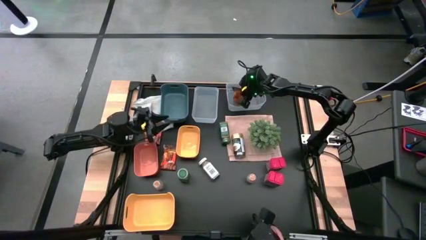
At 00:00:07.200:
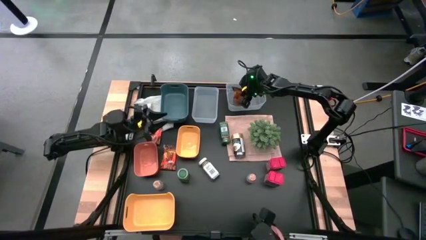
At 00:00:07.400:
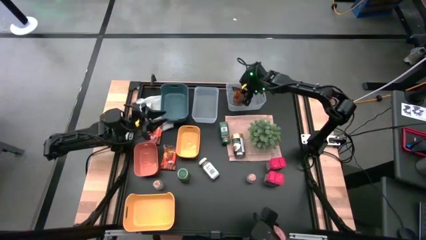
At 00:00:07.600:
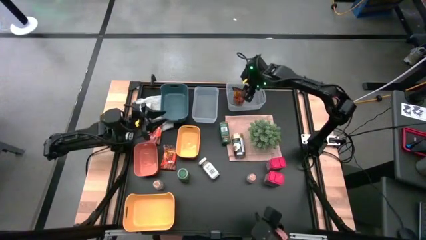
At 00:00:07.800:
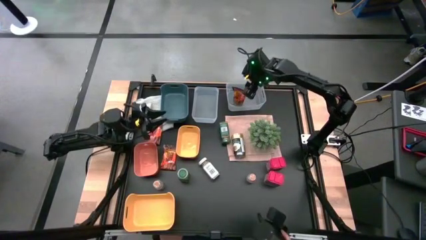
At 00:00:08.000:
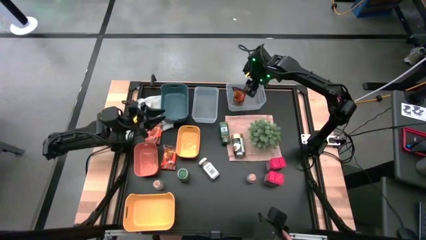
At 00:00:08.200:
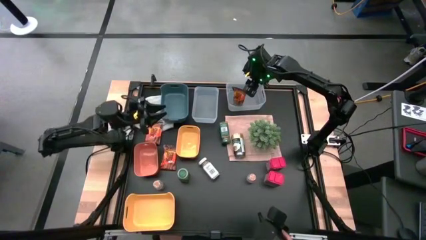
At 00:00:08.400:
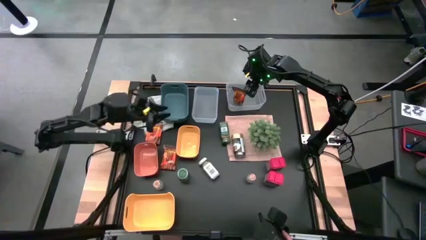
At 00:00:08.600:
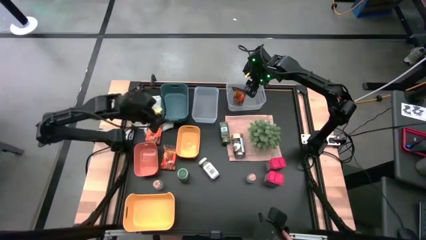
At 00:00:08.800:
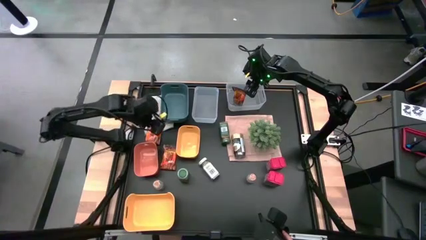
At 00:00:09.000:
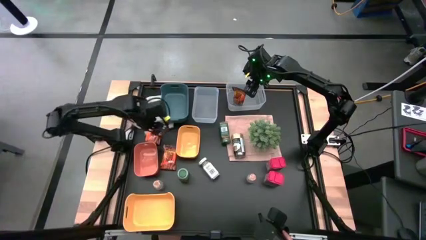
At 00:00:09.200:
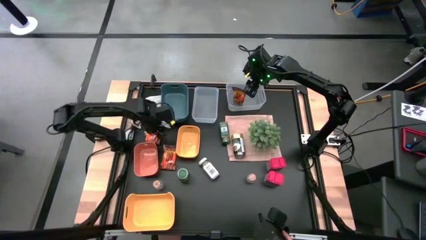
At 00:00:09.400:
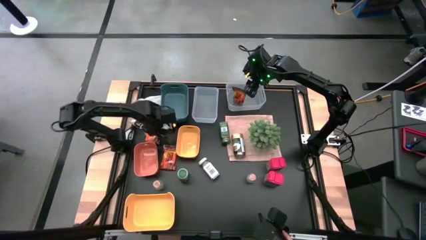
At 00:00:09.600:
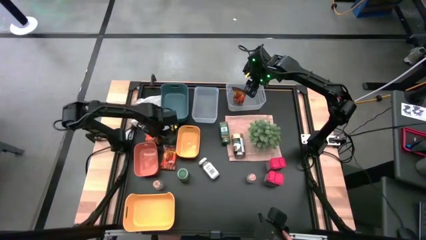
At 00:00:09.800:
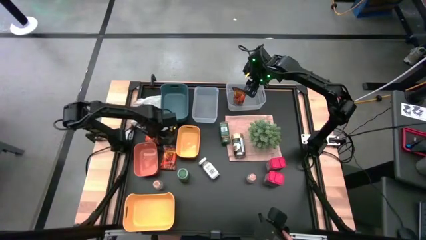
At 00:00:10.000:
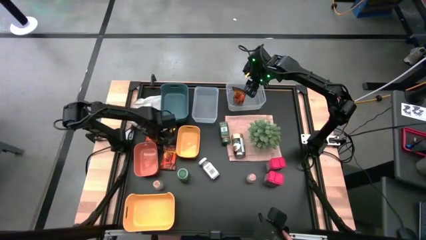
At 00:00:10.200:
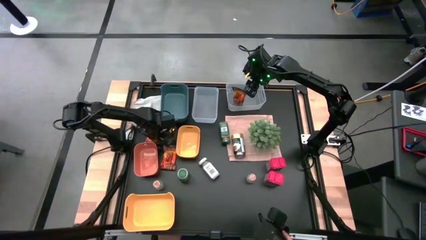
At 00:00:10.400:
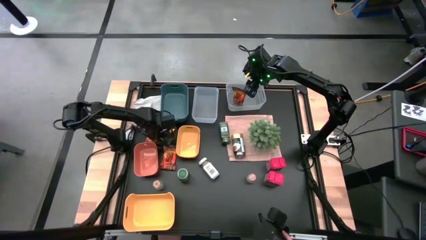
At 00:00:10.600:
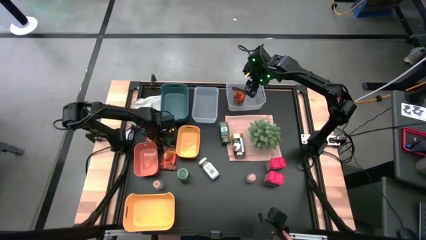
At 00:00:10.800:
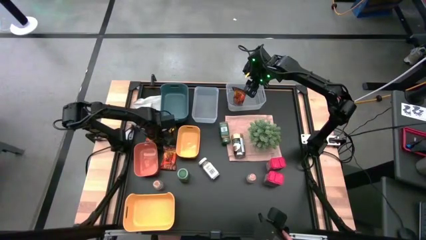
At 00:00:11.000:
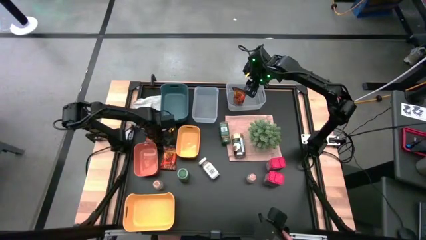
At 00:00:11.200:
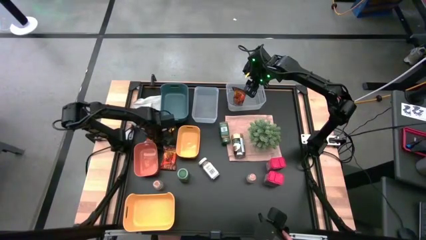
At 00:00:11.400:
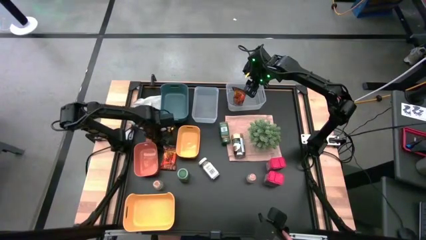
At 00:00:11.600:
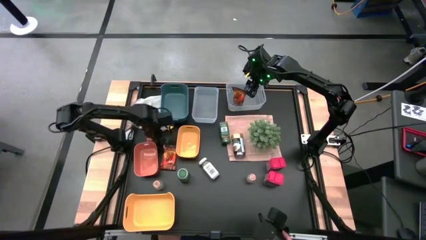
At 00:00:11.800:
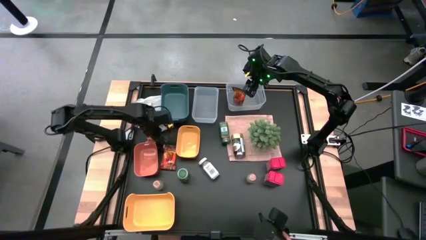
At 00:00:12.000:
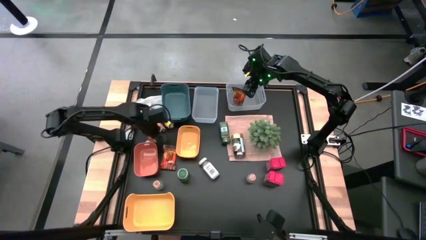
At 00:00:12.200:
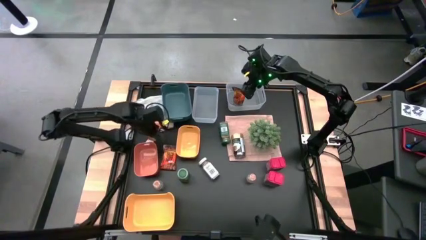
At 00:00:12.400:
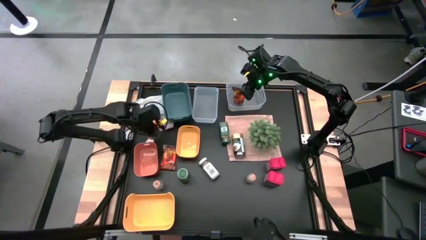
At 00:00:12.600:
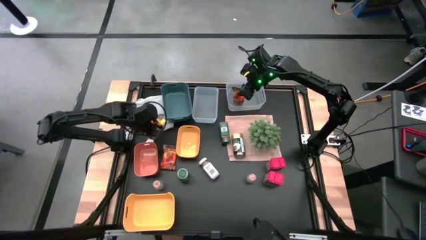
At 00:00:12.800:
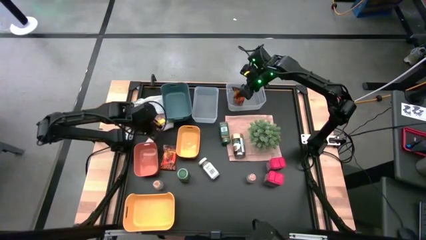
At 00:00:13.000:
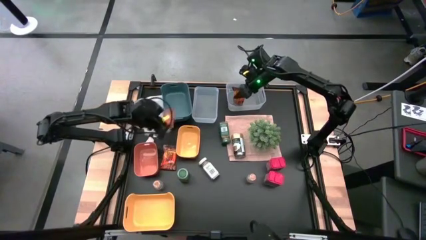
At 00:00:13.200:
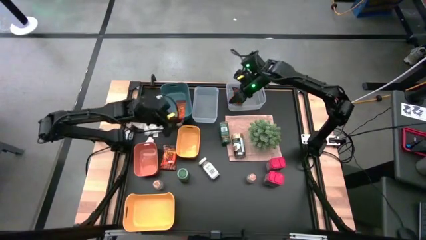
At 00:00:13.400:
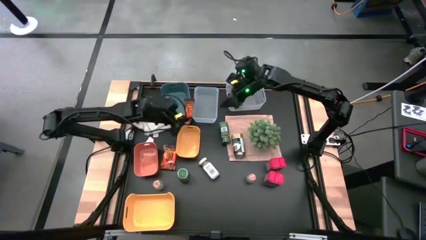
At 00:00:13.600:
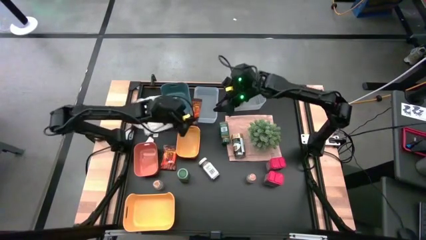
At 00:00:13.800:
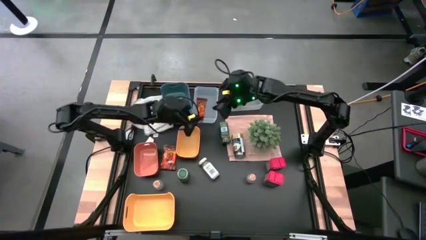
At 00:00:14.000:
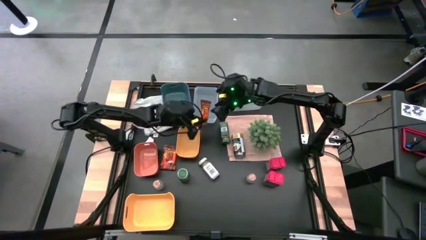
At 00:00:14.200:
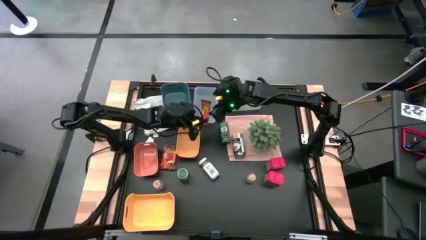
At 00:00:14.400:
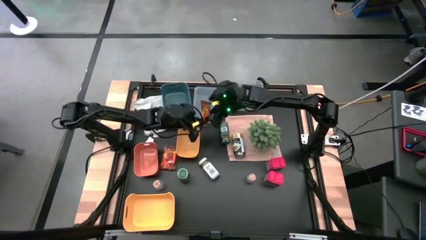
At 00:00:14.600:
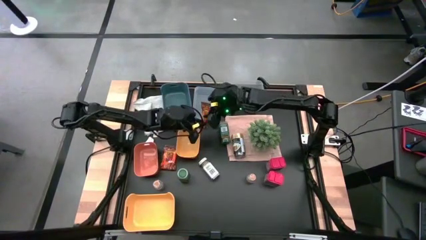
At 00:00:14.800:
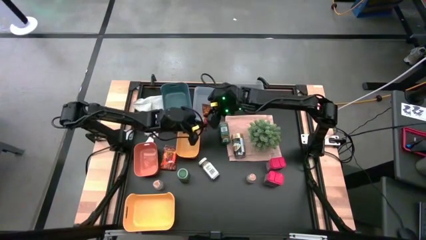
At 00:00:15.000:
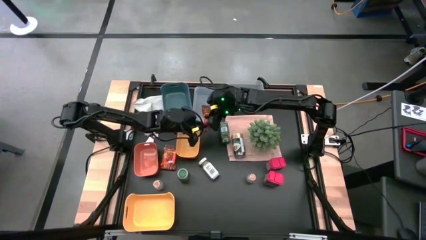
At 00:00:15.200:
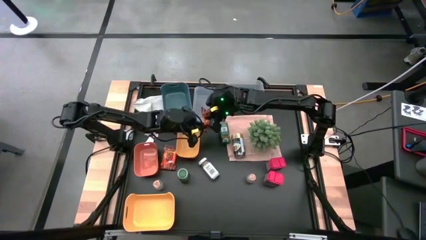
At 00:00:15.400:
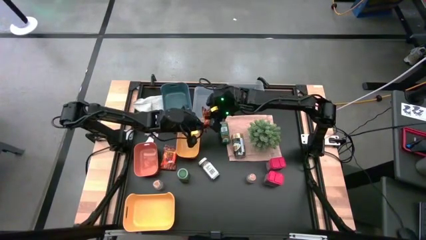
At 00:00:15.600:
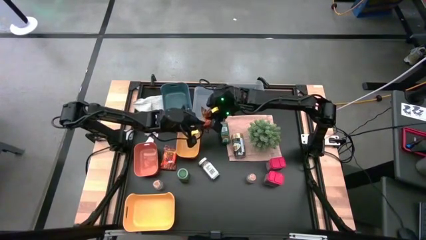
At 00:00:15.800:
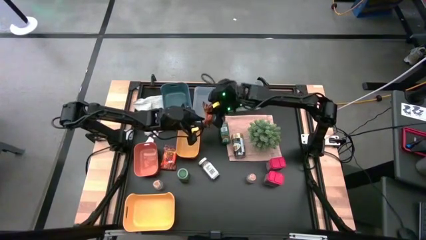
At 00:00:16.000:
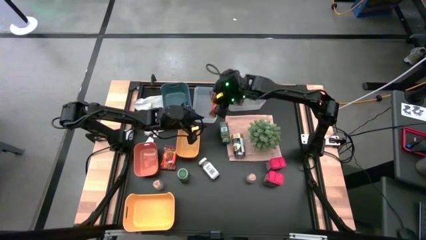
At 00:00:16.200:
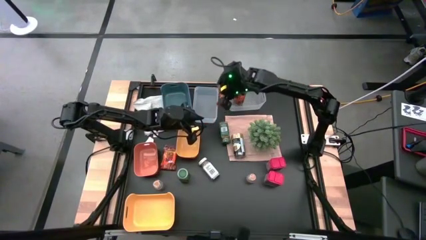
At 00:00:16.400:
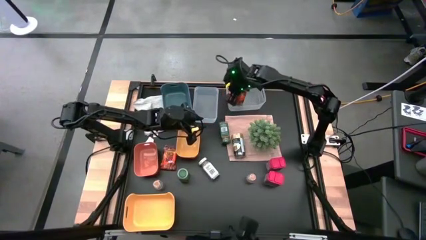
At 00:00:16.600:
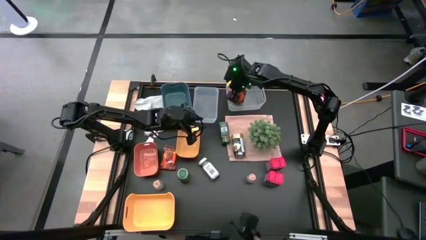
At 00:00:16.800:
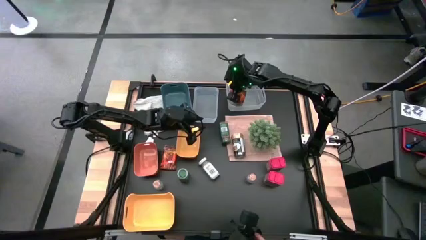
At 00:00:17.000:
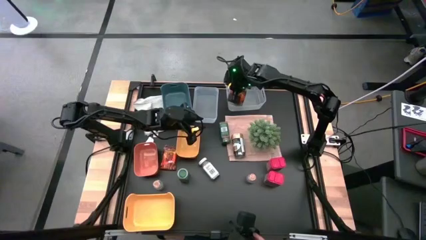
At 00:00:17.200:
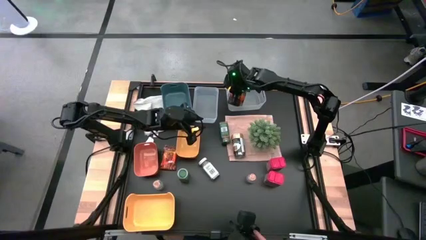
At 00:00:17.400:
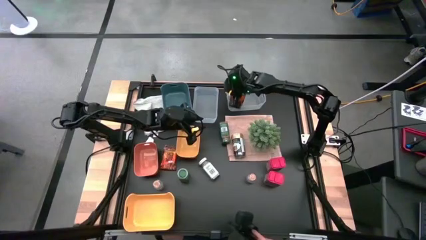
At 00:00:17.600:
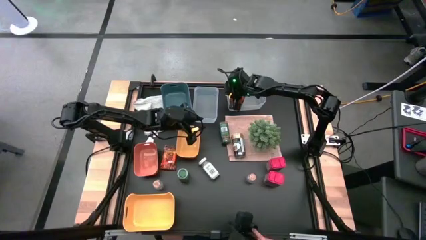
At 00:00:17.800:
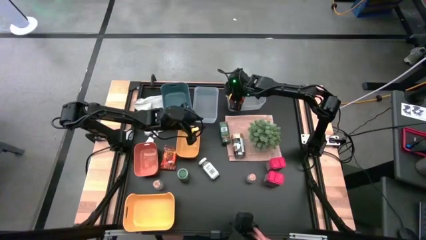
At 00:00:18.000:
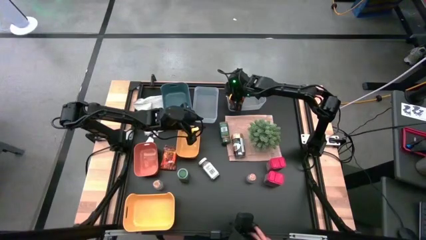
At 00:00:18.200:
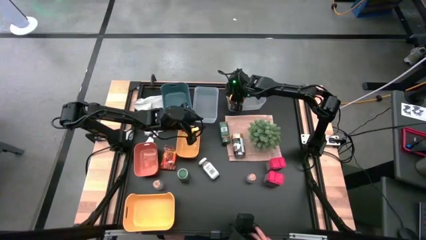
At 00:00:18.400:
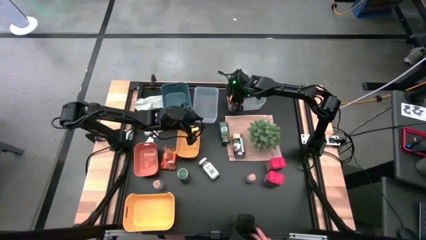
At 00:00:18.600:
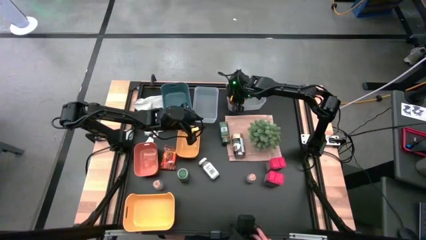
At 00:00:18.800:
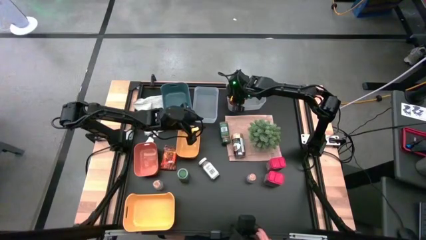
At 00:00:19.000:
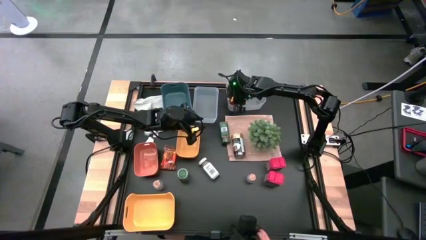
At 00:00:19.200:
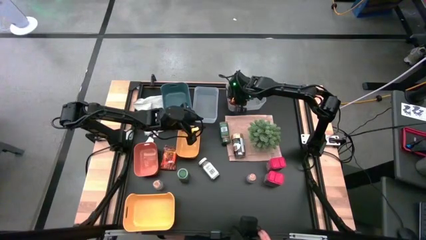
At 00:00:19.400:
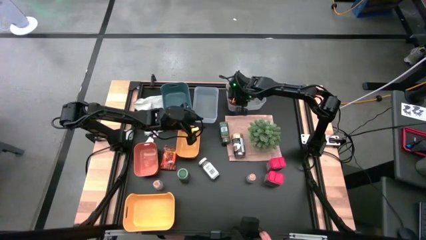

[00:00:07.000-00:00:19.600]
Task: Sort spices by type
Put the top orange seasoning pack into the right transparent bin
